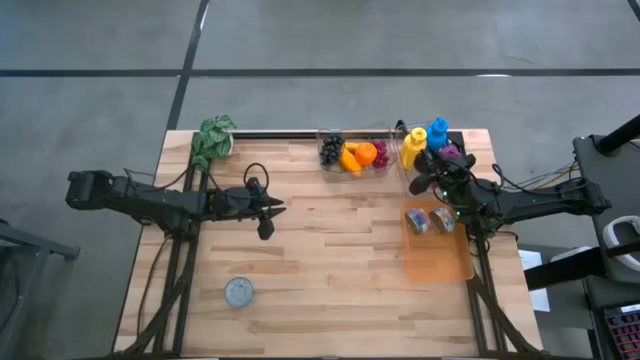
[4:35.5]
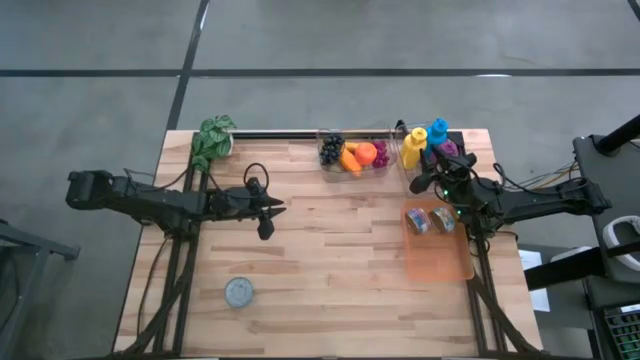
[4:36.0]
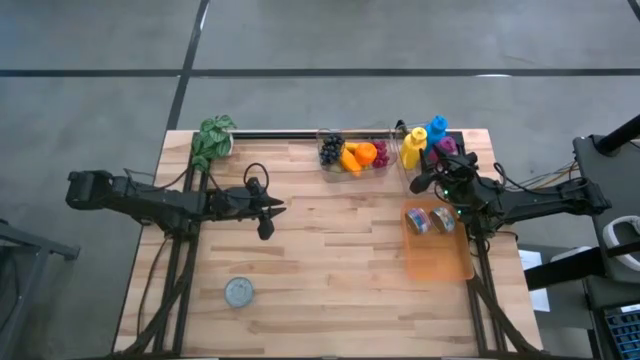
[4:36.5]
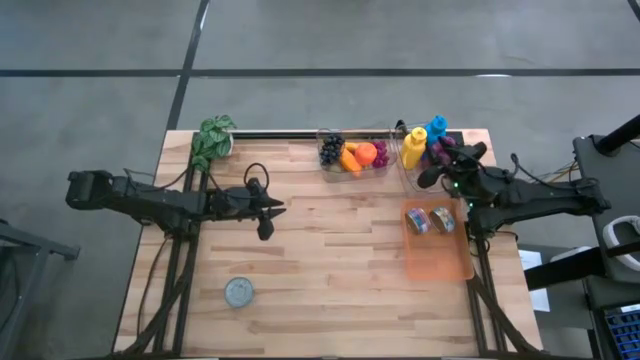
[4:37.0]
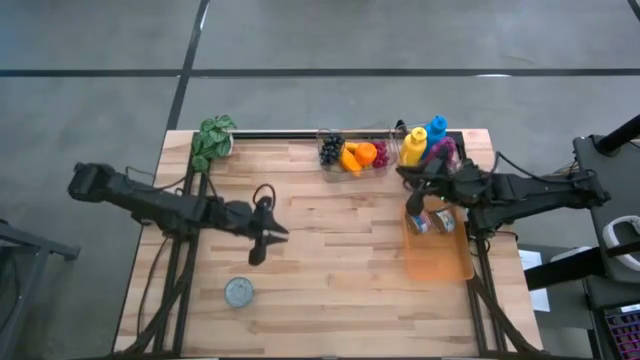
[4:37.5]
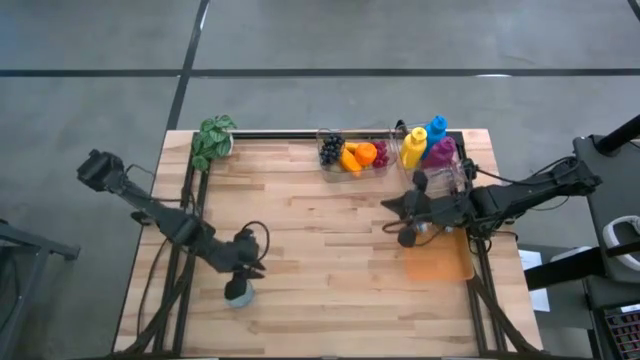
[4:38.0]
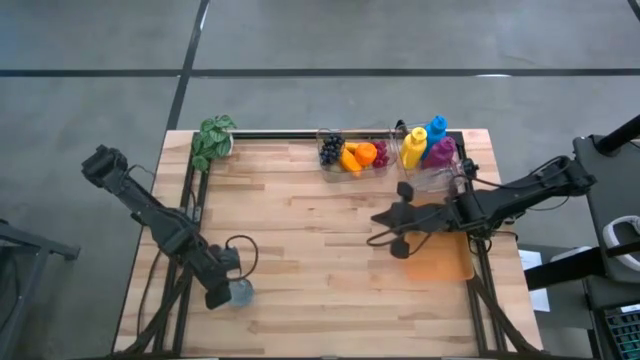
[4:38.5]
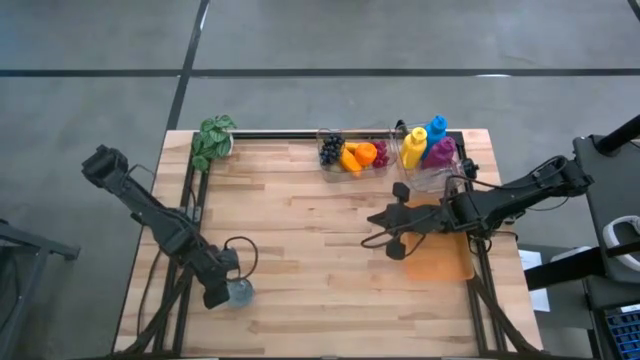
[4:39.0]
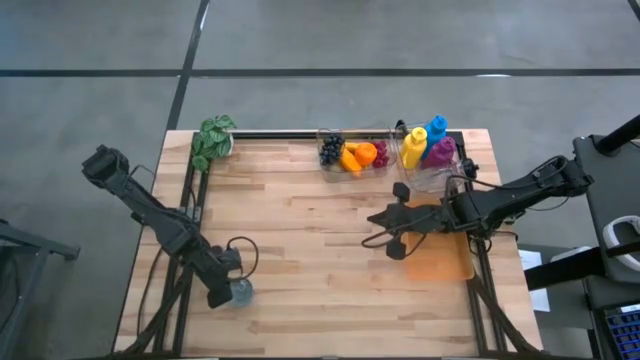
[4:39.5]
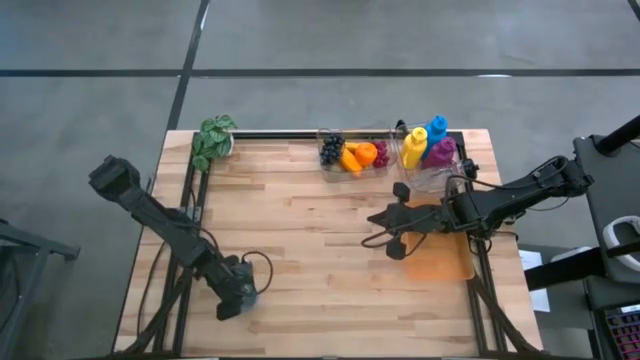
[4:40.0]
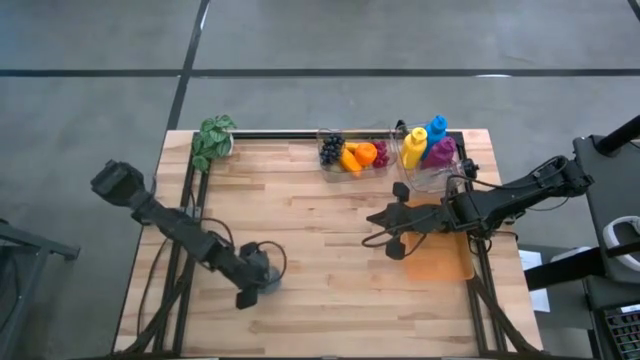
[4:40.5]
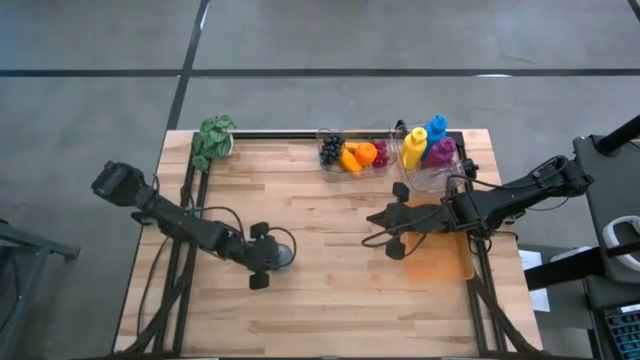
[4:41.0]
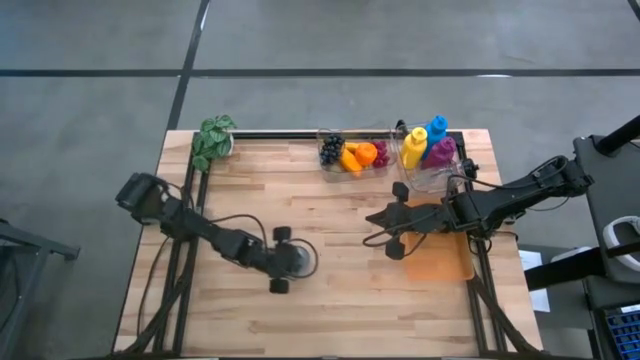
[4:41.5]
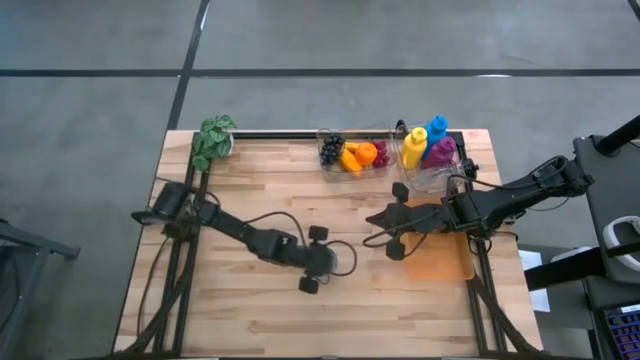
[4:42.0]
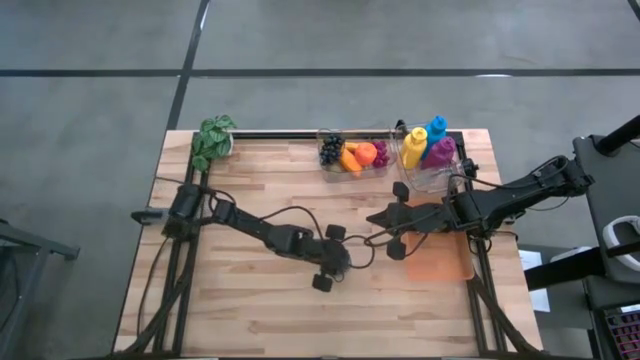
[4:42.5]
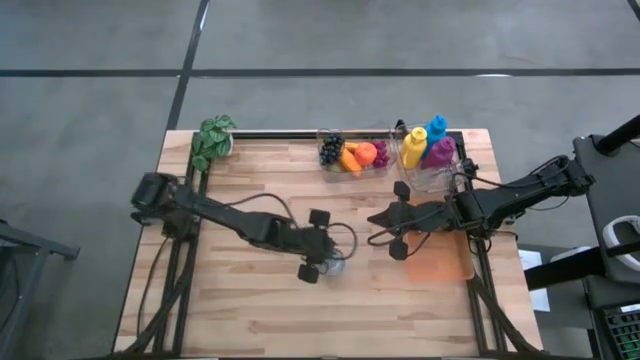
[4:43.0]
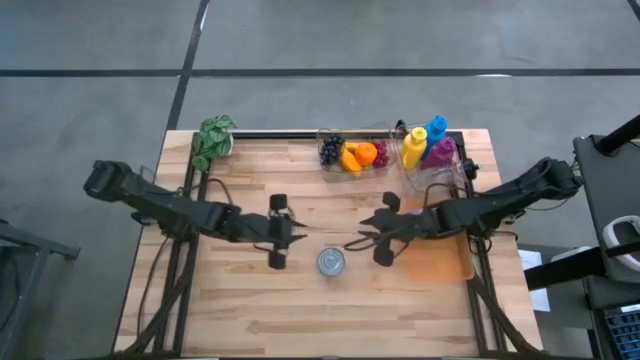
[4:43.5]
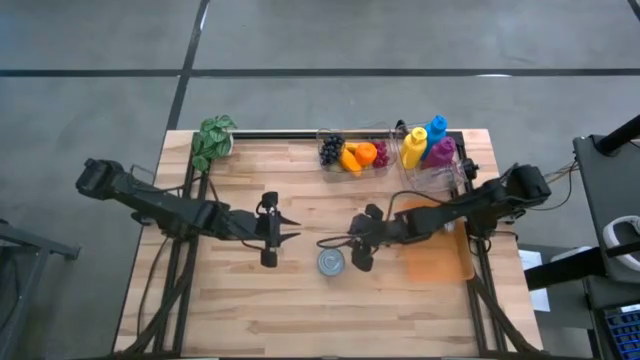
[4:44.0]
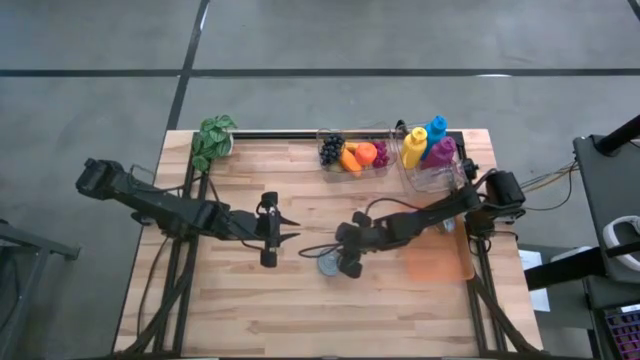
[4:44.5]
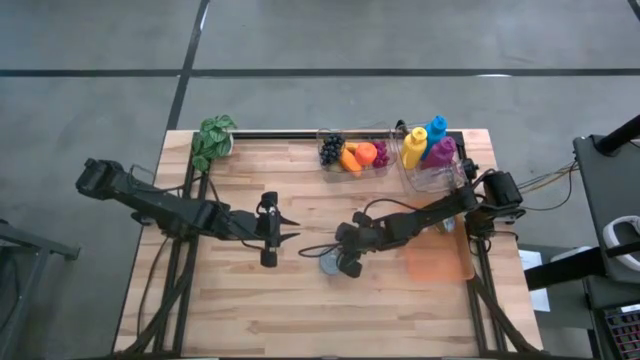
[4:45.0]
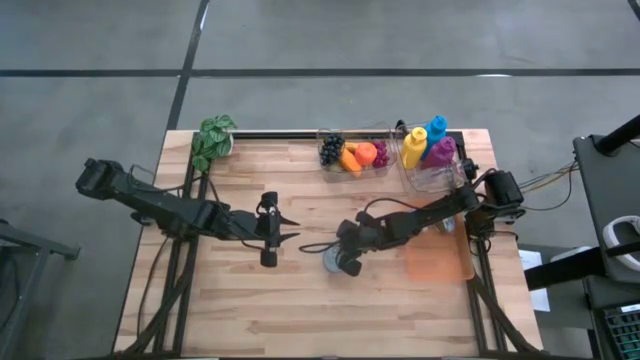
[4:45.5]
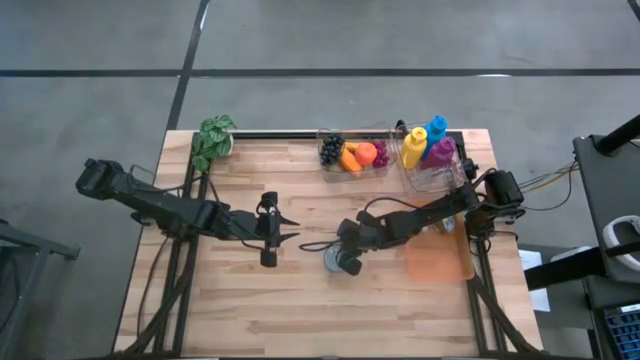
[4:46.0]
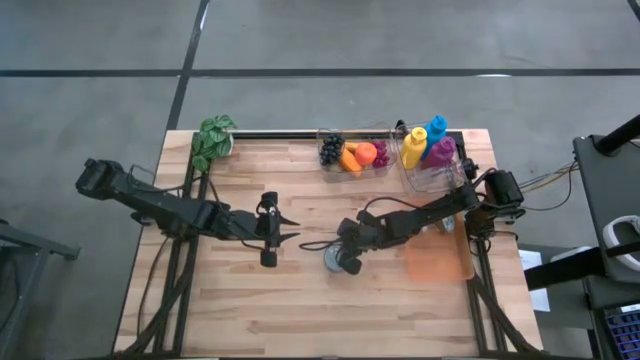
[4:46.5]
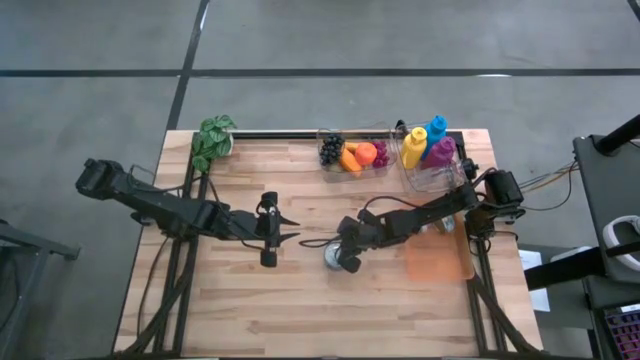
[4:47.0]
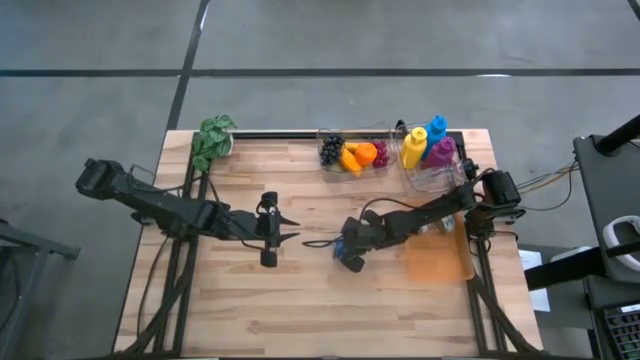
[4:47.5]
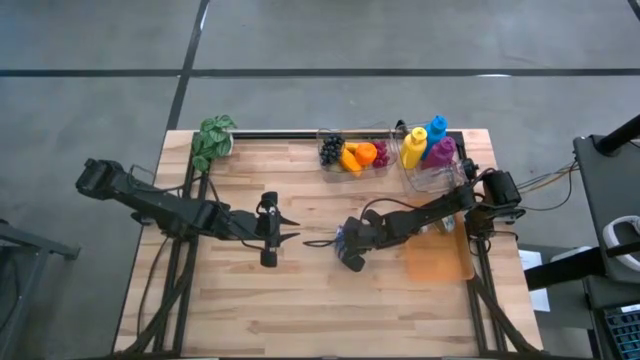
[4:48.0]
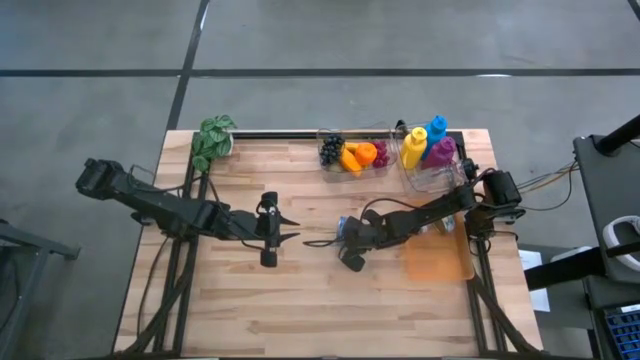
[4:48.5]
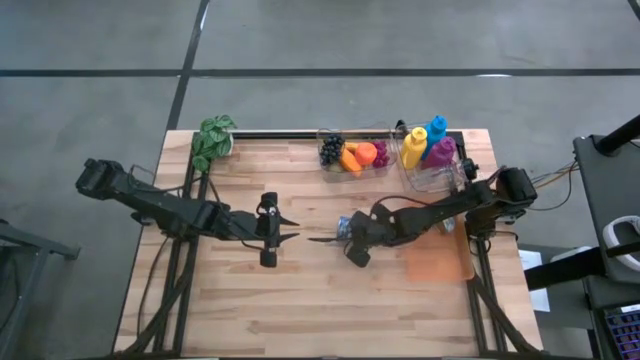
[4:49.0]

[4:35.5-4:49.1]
Task: Pick & Place Food Item
Put the blue tuna can into the orange bin
